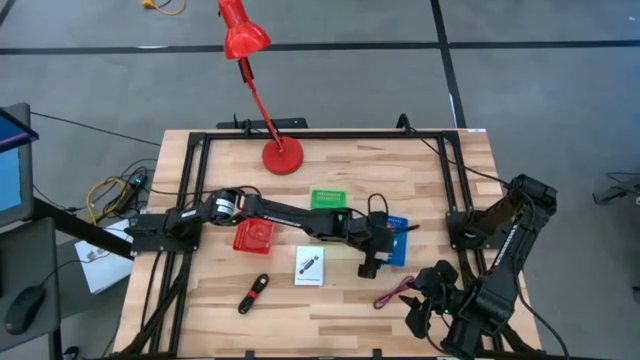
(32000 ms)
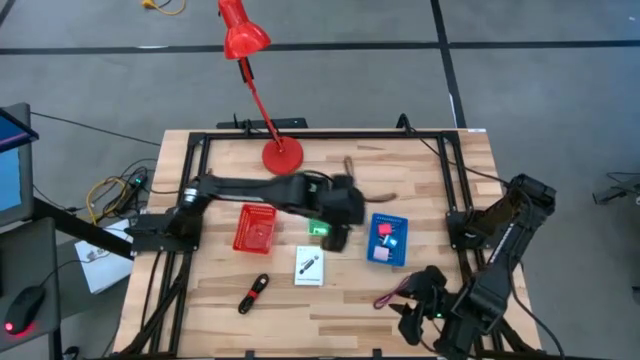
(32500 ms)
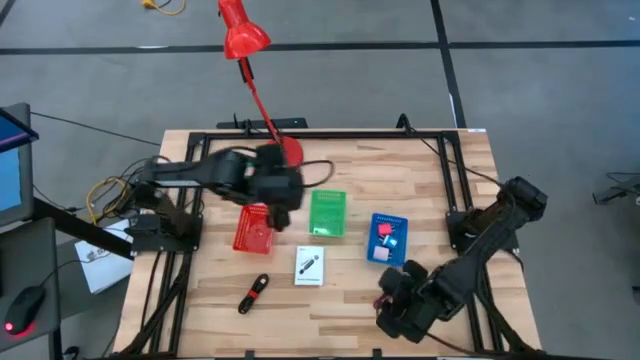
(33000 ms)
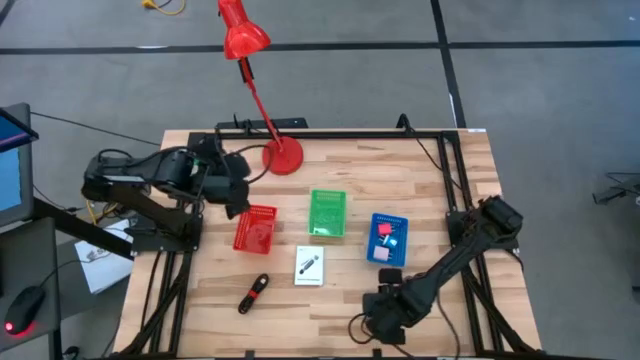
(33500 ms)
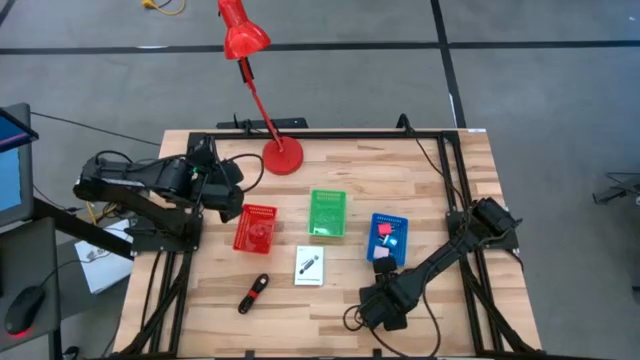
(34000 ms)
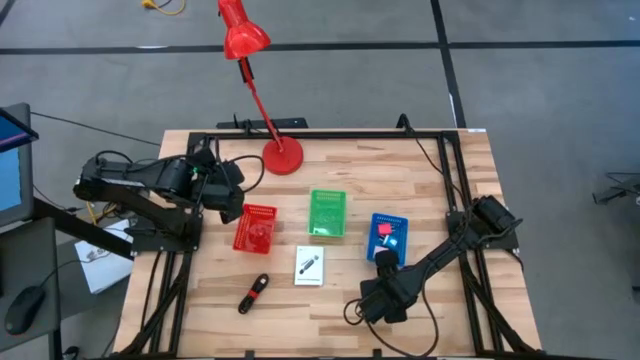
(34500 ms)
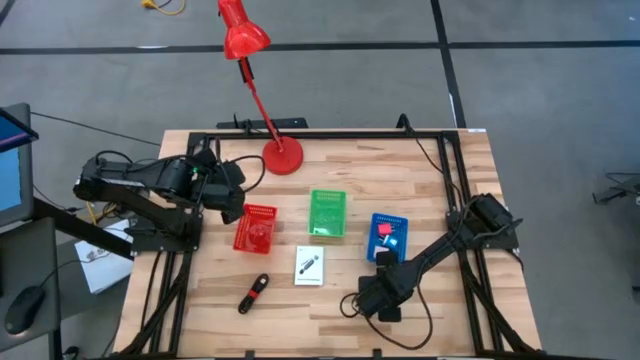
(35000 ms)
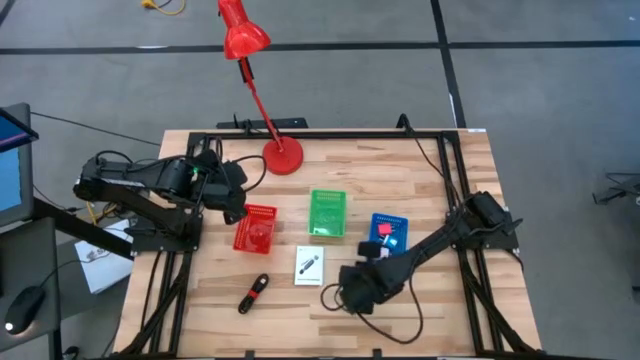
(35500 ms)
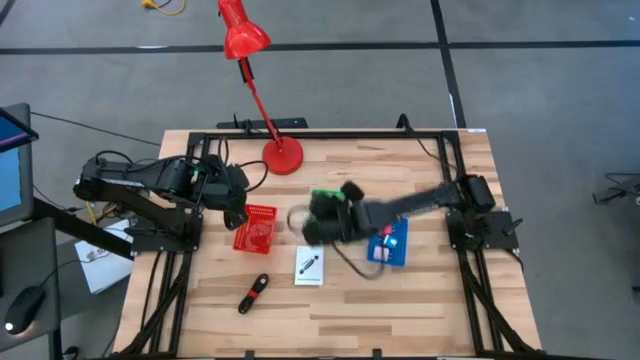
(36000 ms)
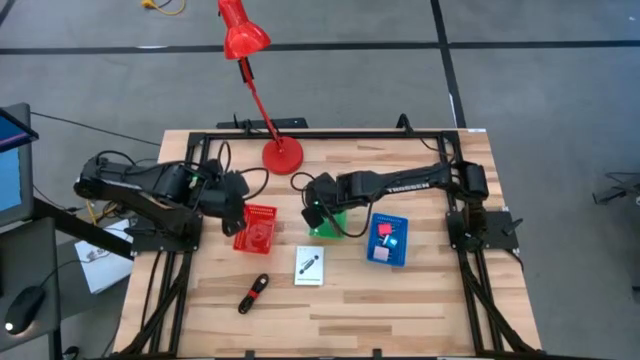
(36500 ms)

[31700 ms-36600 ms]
Task: Pick and place items into bin
Put the purple charger cable into the green bin

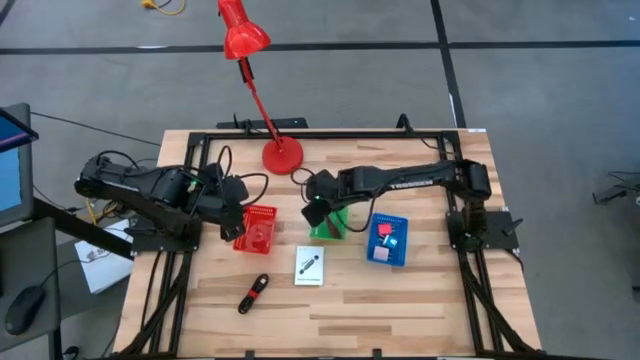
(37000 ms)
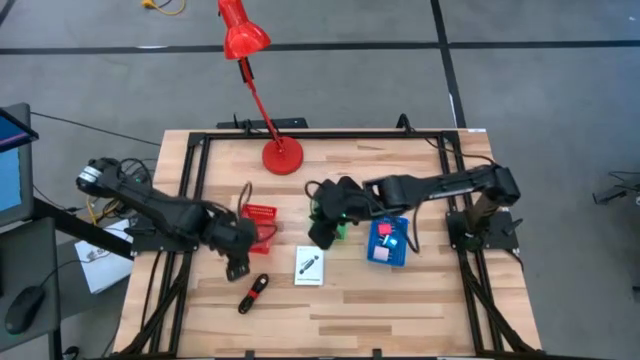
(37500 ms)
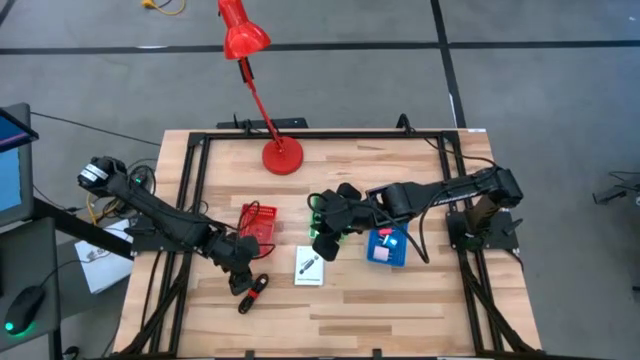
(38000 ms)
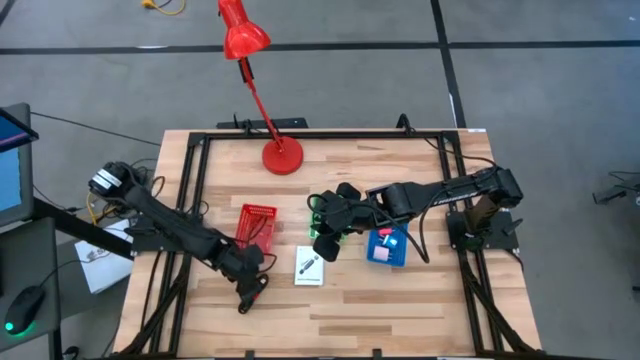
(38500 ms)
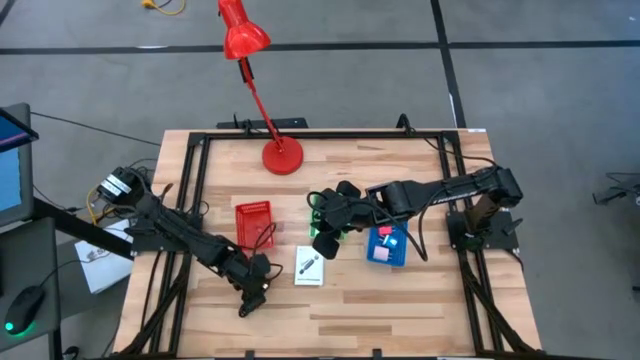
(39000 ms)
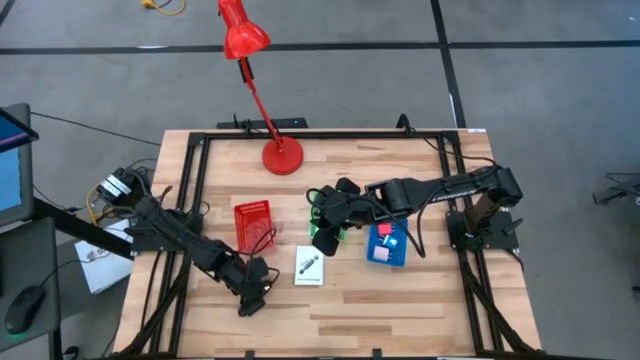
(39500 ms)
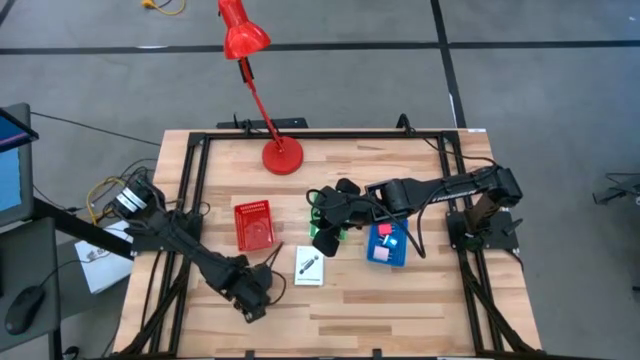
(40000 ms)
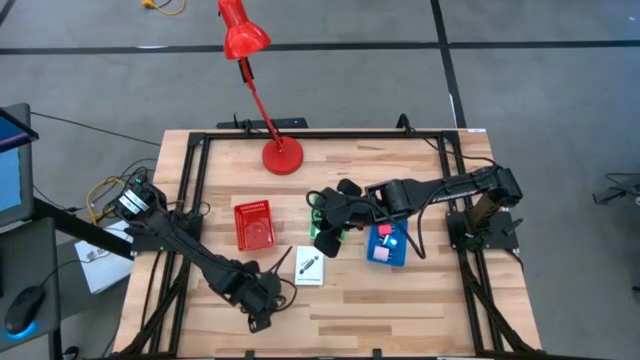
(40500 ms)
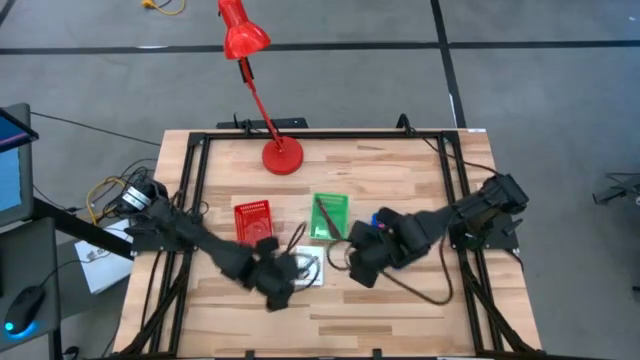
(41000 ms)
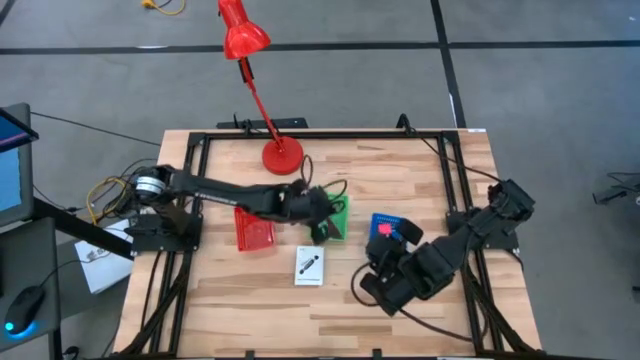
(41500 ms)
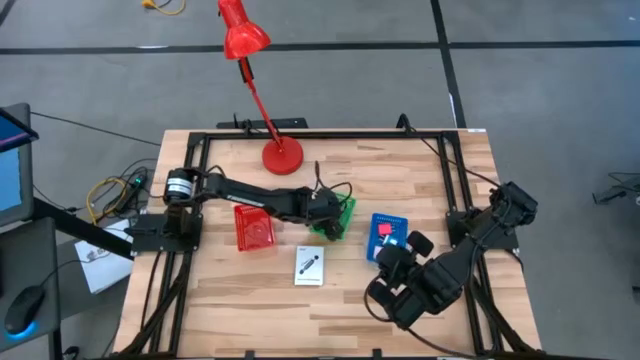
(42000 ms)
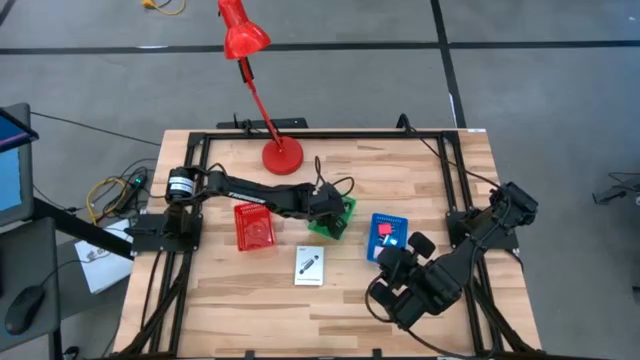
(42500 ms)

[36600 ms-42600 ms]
Put the black charger cable into the green bin

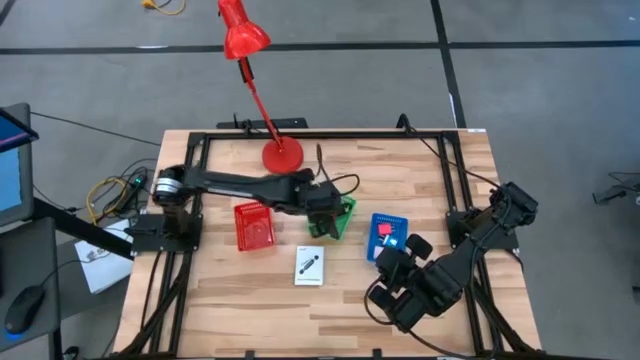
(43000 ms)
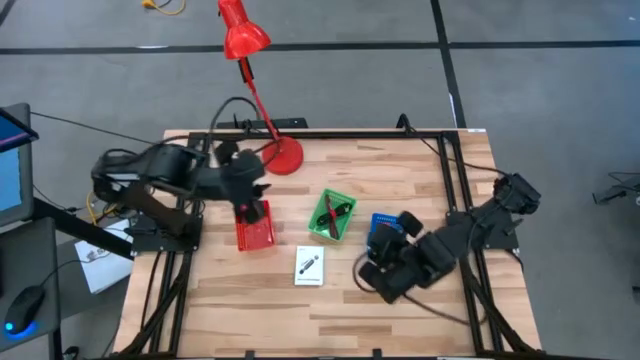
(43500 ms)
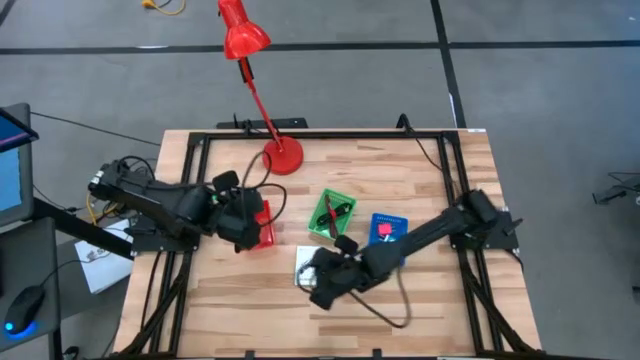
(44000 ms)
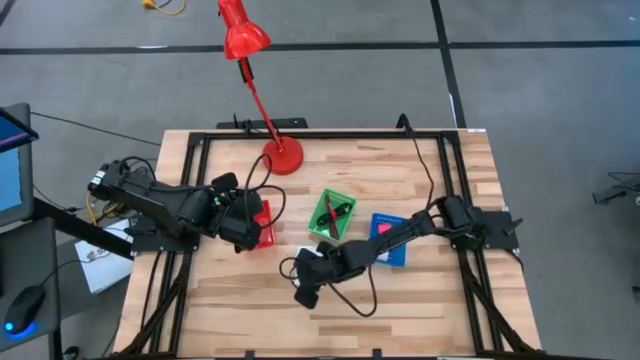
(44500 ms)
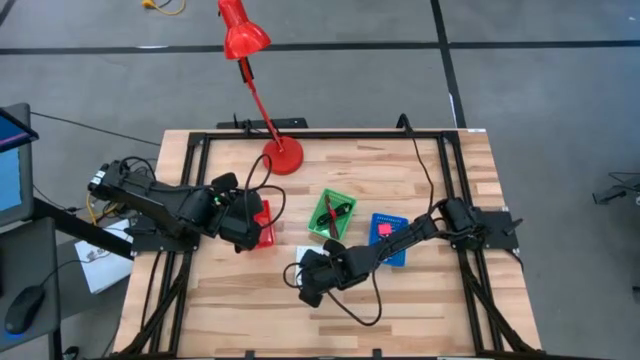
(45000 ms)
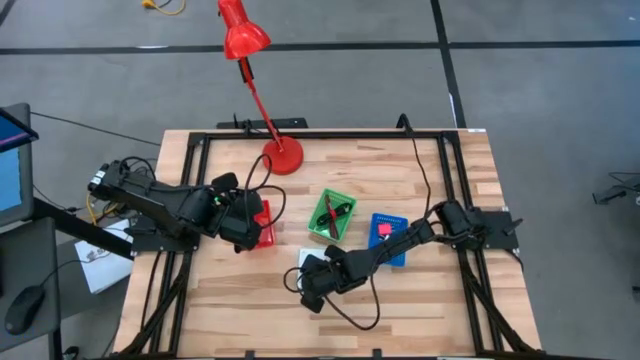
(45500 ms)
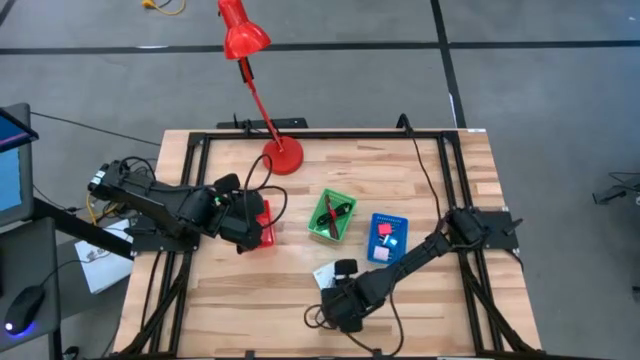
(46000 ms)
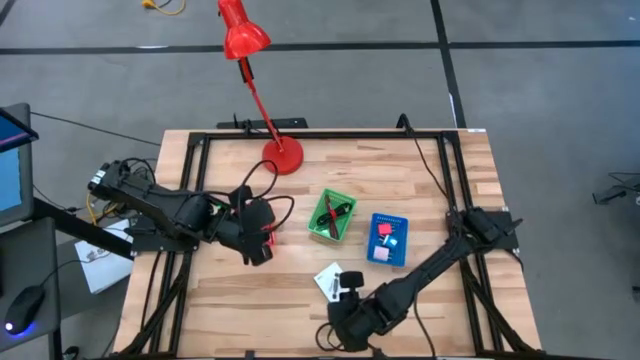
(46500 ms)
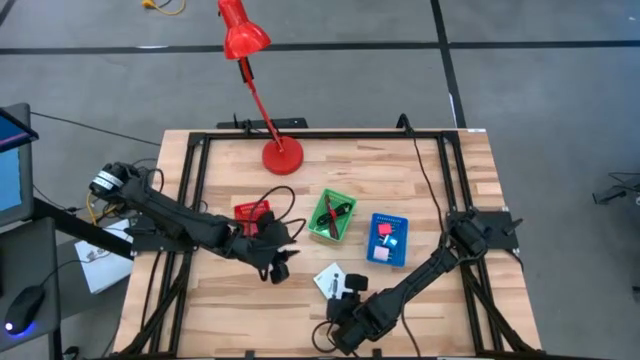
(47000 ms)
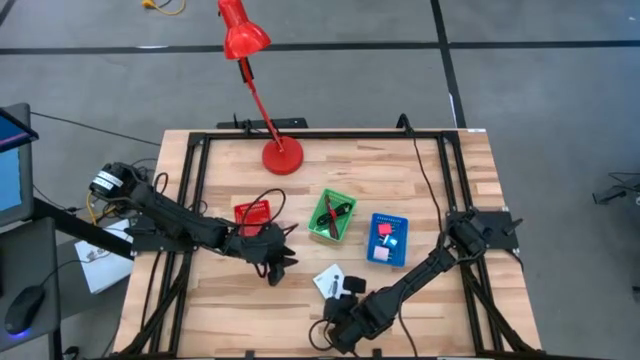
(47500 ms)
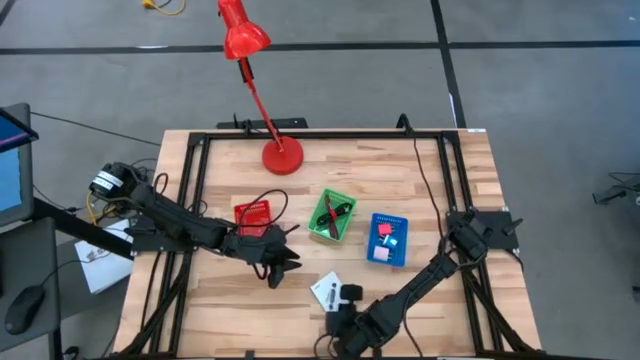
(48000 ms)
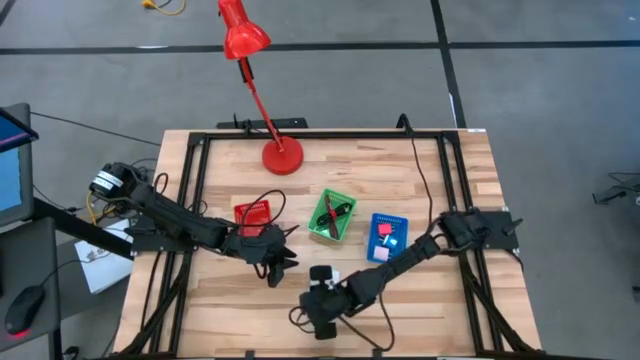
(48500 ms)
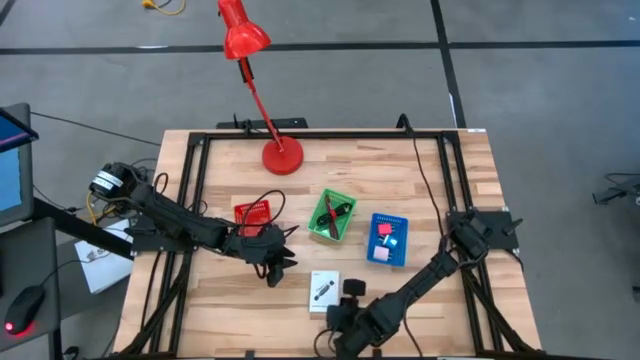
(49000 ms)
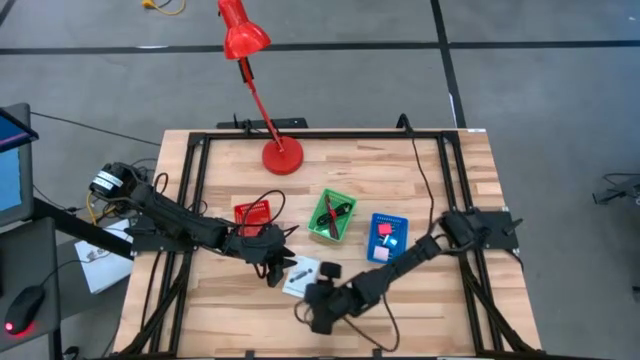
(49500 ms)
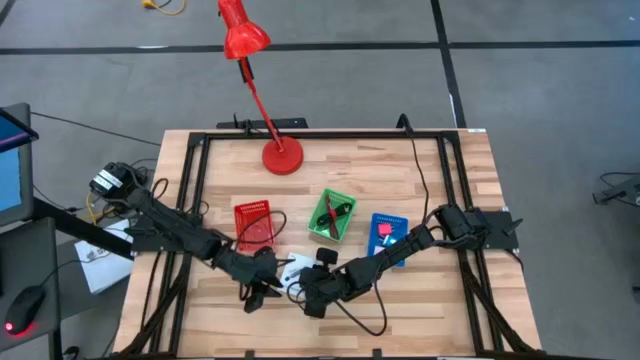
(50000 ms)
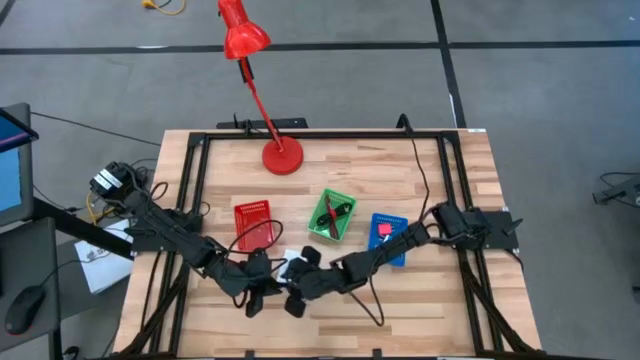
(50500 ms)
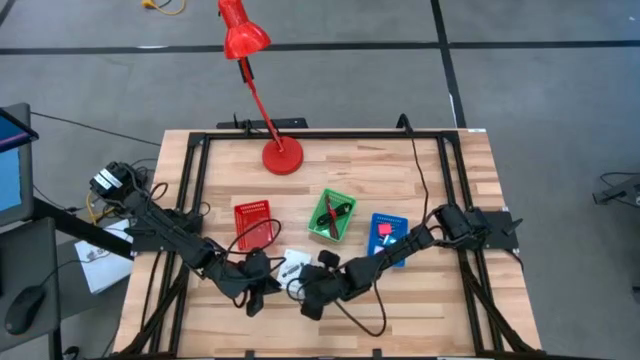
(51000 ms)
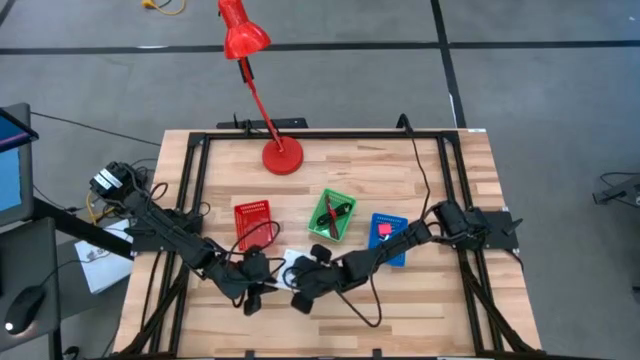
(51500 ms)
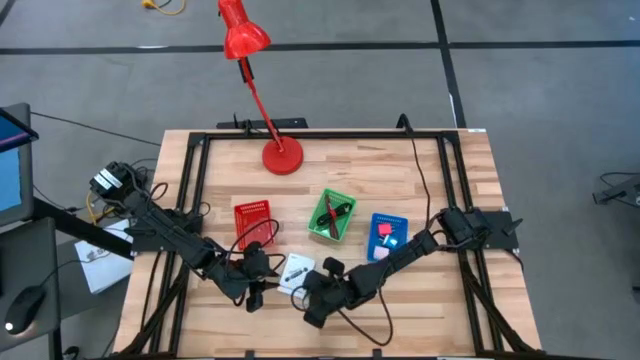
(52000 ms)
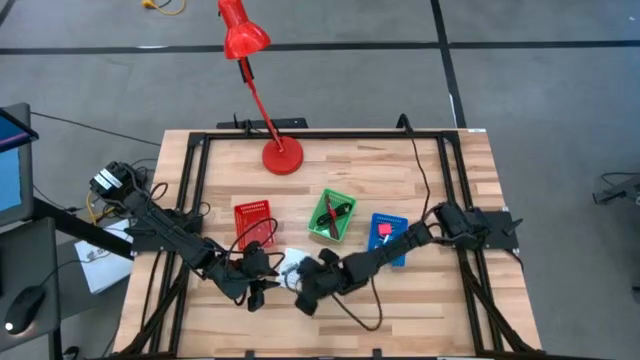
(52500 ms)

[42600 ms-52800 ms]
Put the white card reader box into the orange bin
